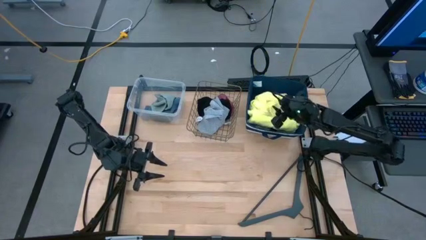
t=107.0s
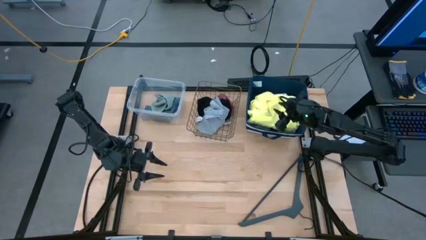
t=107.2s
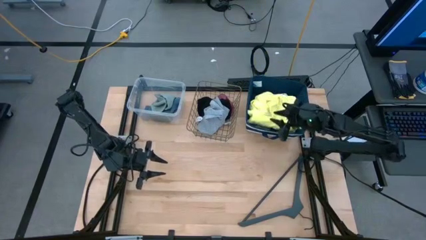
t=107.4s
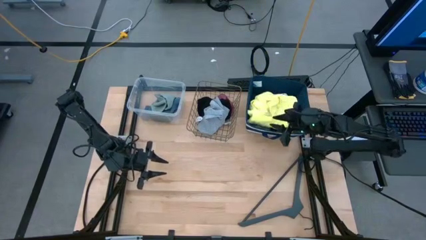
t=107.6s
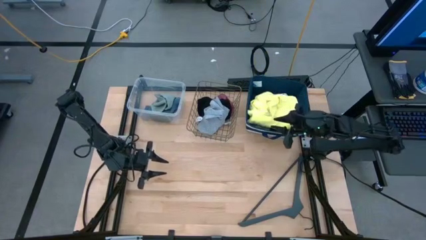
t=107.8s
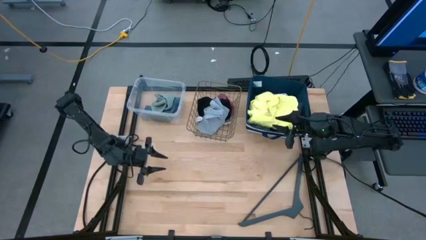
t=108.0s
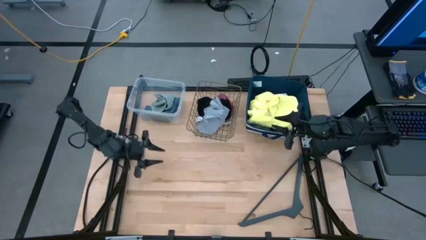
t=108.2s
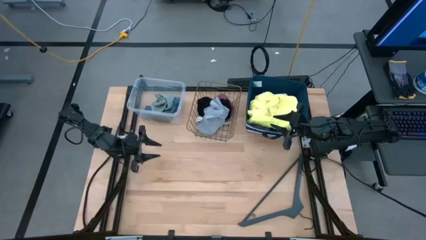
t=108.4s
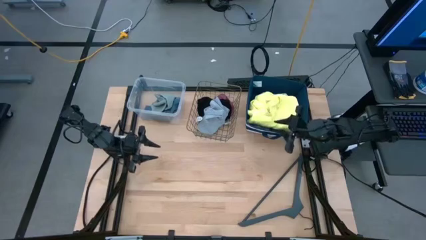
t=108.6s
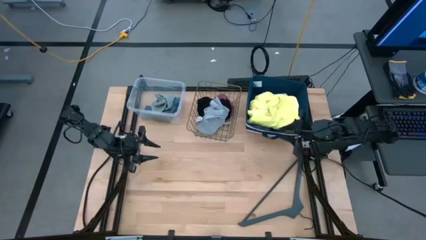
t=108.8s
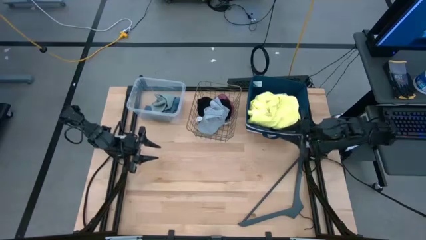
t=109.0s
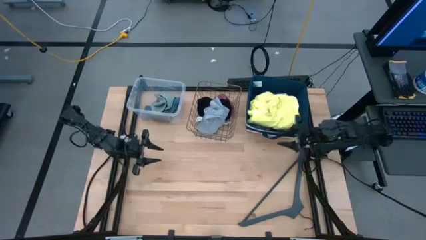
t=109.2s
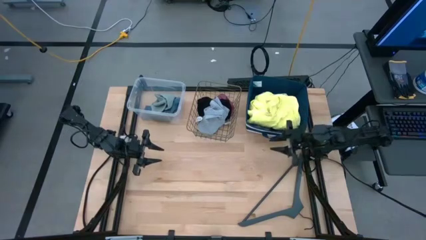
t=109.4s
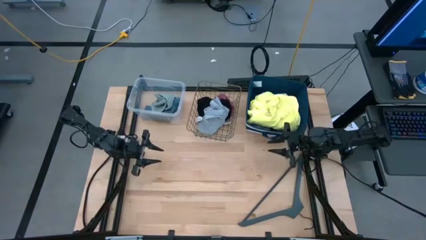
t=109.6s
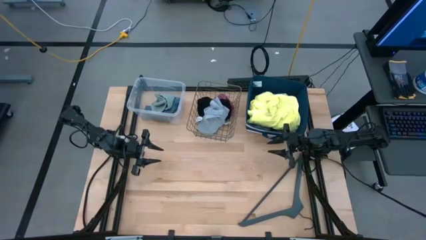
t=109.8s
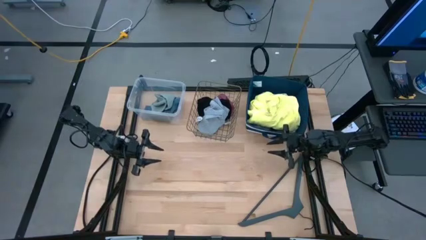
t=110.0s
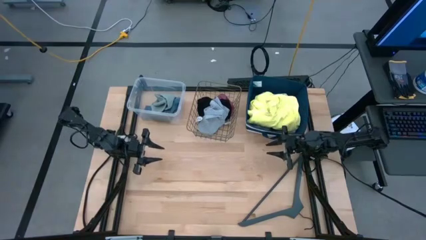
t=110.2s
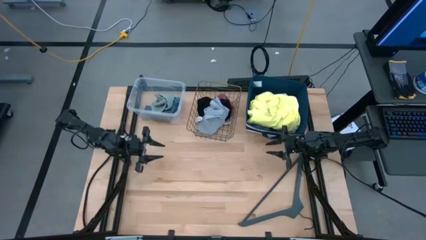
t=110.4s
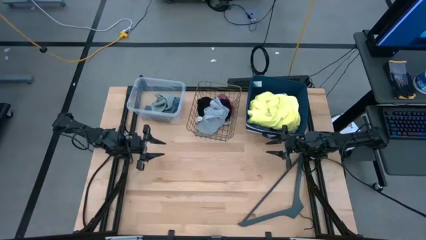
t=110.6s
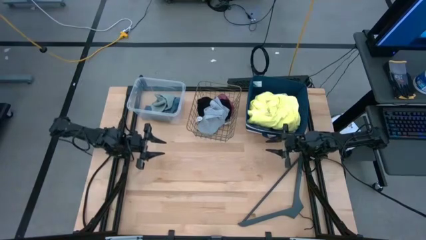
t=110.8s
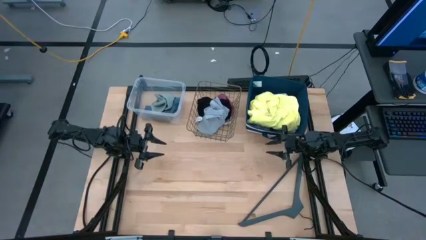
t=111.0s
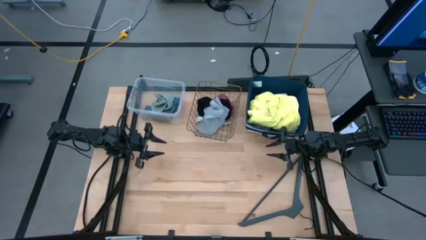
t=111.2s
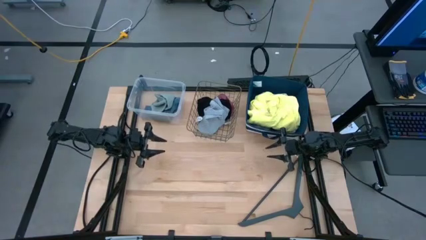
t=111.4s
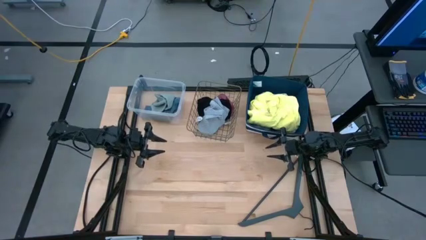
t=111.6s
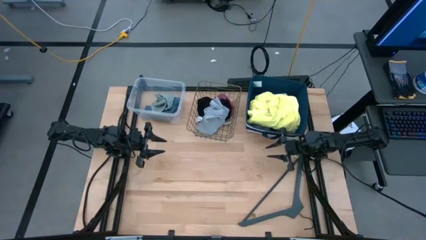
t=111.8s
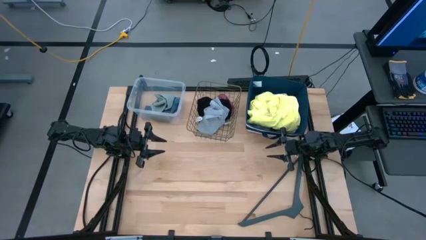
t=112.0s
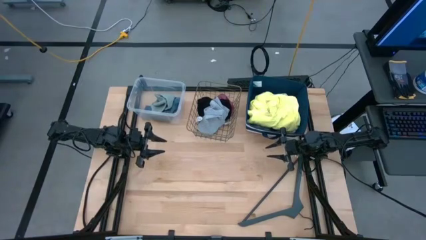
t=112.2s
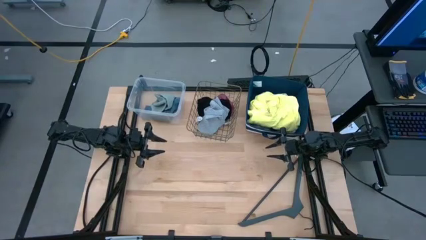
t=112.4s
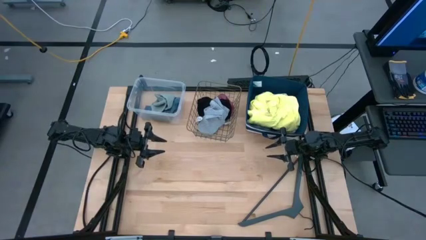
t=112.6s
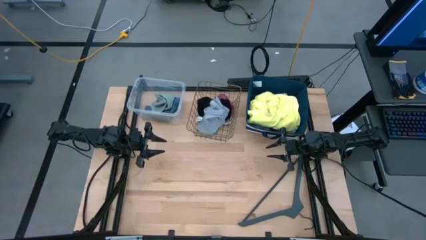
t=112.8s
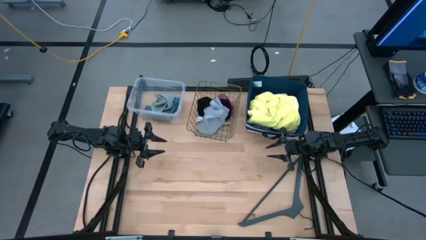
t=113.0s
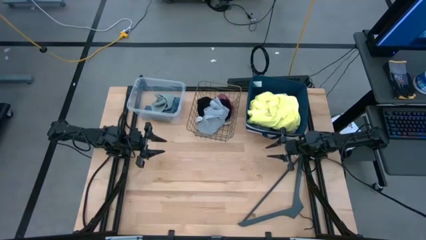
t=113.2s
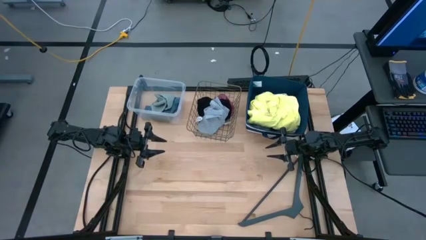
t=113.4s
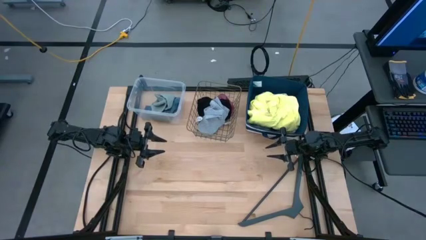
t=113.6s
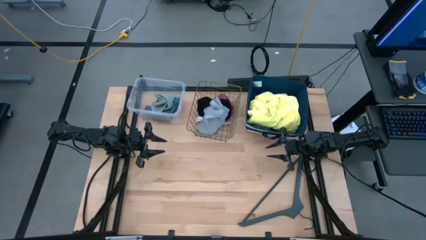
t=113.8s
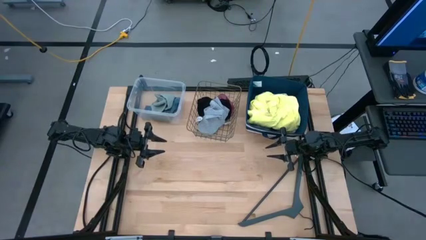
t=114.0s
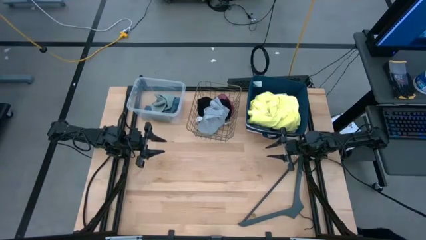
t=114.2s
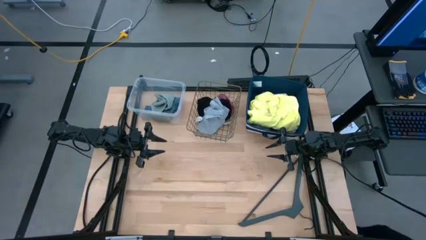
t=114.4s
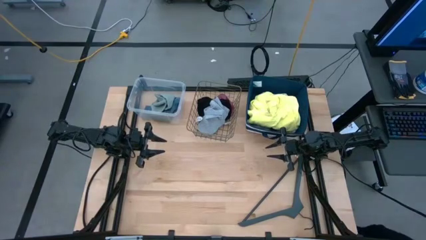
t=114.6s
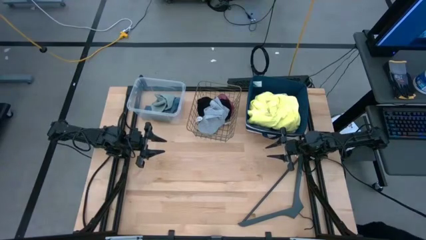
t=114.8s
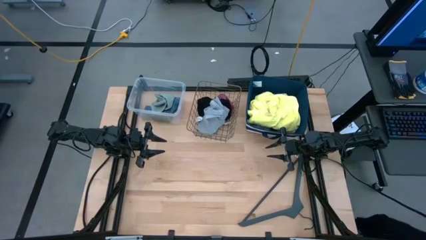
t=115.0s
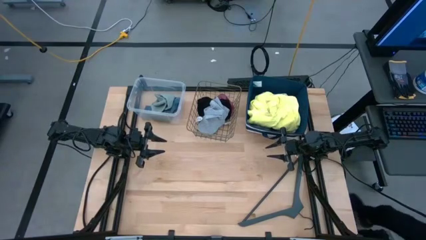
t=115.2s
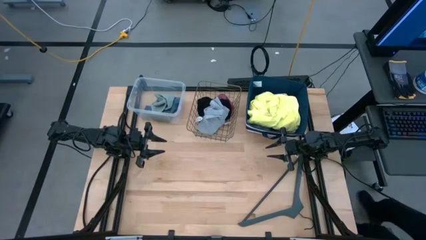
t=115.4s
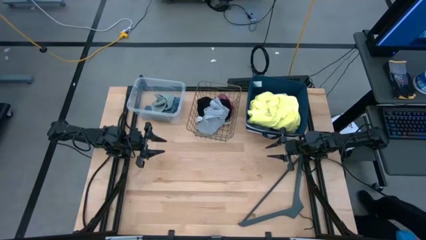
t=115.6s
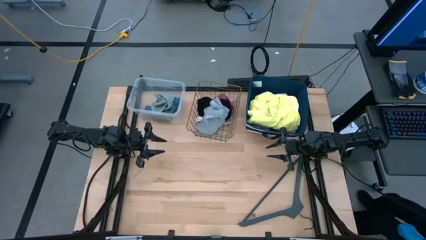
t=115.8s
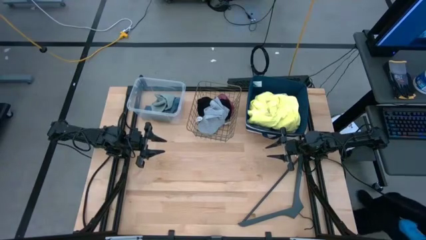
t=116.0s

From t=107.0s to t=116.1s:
Task: Pick & Place Cloths
Return to Home Position

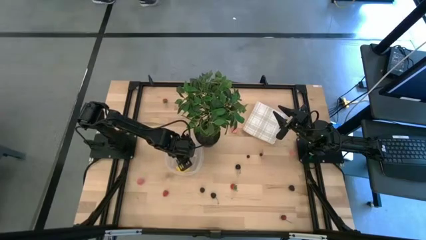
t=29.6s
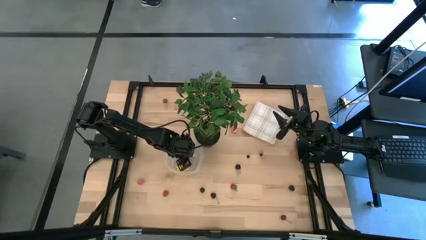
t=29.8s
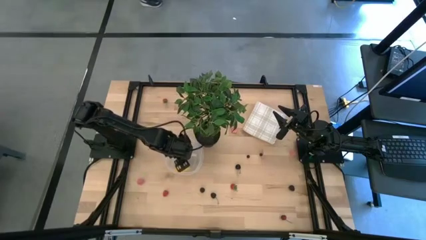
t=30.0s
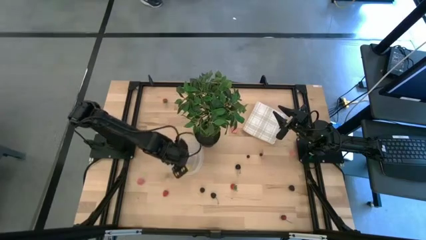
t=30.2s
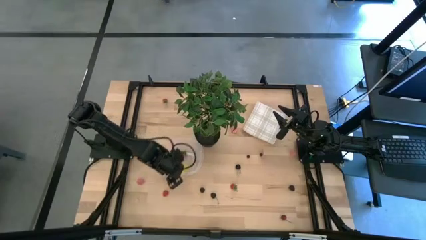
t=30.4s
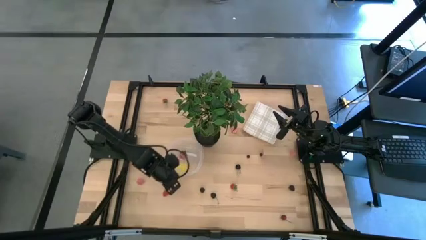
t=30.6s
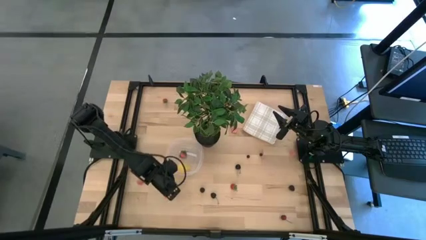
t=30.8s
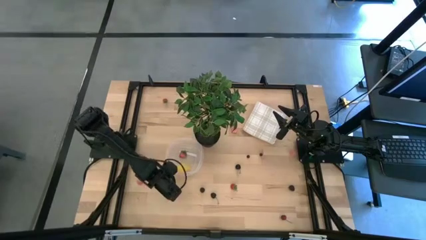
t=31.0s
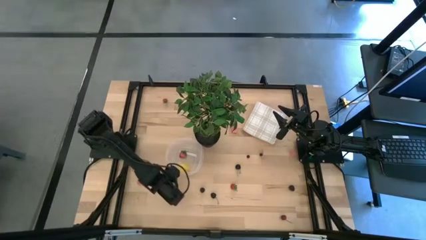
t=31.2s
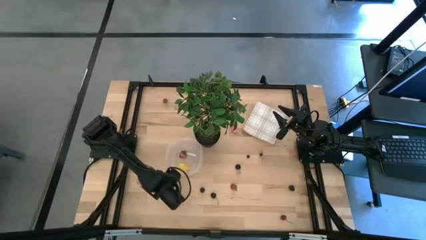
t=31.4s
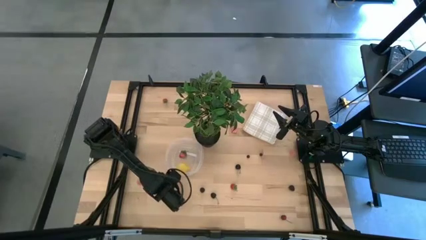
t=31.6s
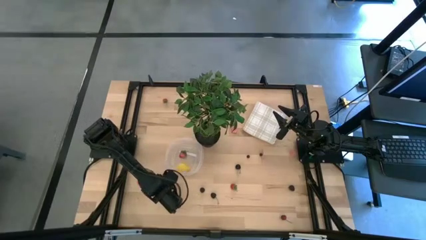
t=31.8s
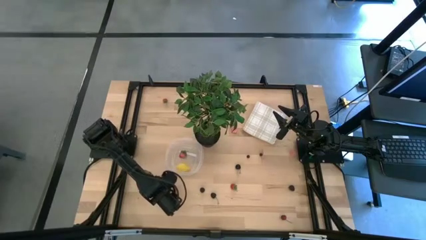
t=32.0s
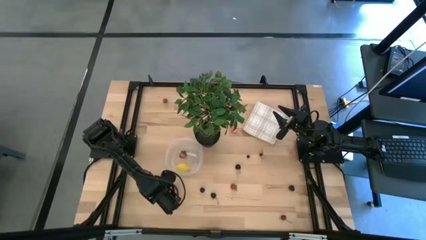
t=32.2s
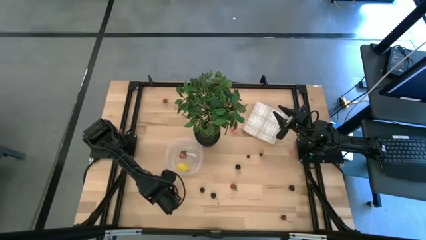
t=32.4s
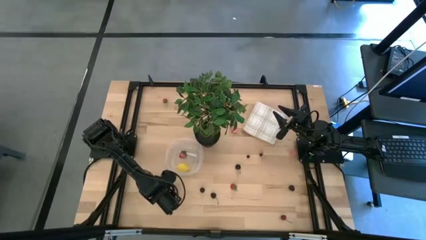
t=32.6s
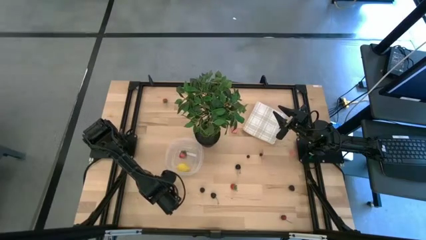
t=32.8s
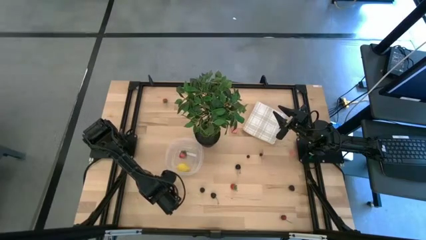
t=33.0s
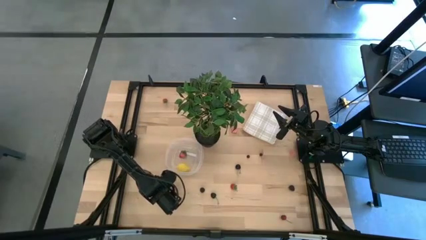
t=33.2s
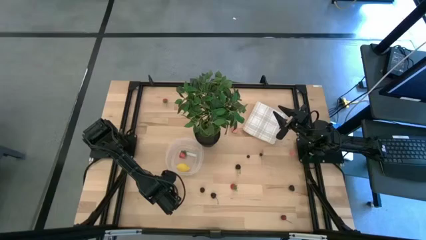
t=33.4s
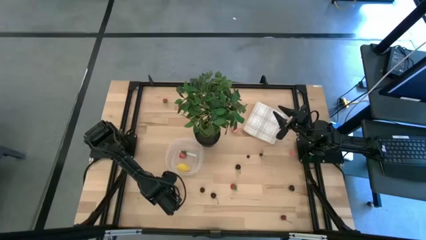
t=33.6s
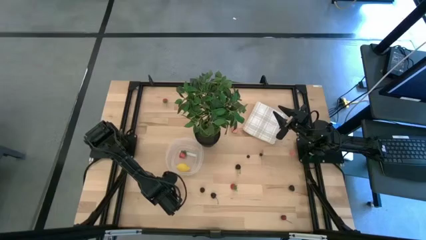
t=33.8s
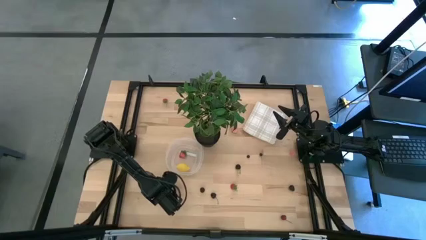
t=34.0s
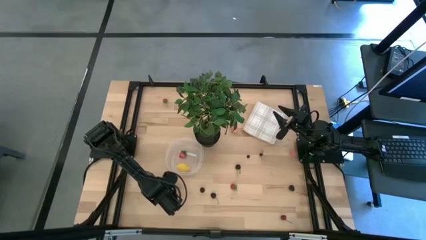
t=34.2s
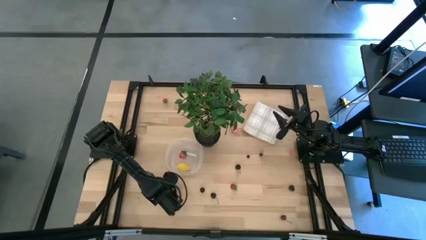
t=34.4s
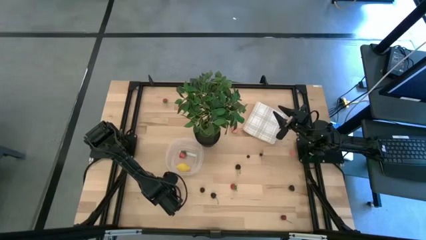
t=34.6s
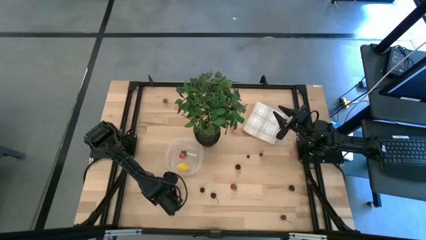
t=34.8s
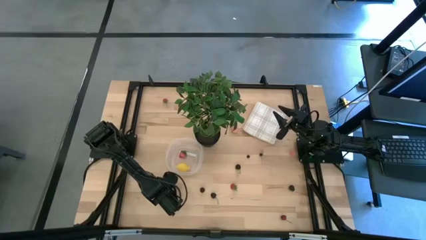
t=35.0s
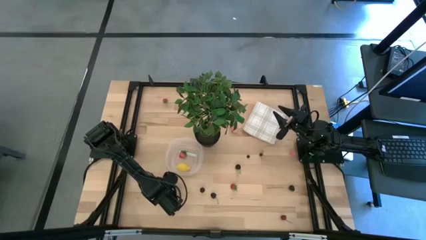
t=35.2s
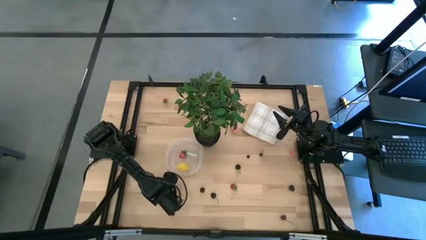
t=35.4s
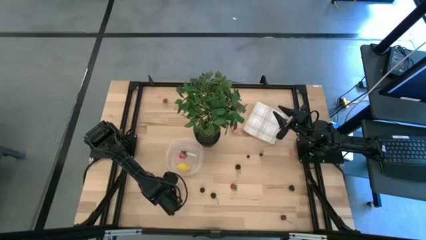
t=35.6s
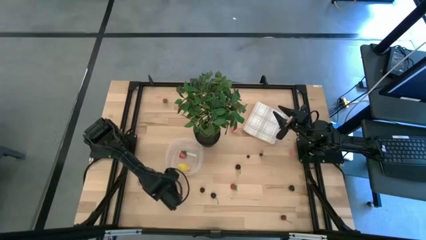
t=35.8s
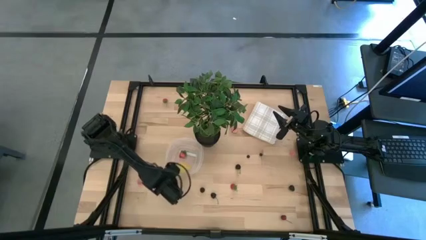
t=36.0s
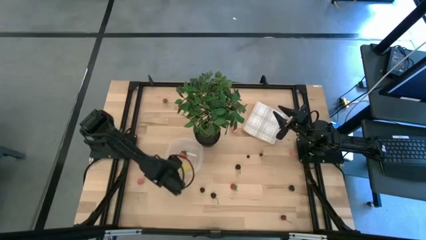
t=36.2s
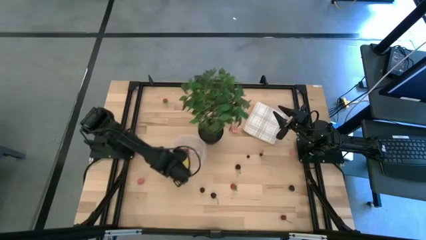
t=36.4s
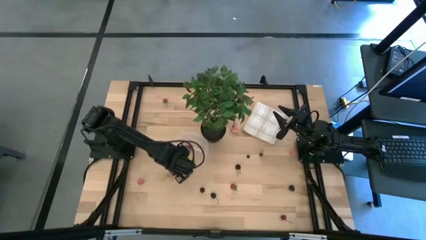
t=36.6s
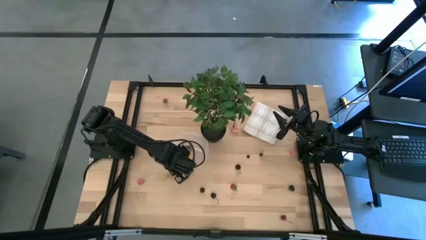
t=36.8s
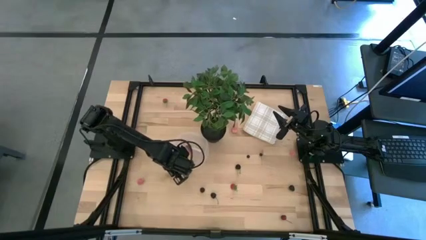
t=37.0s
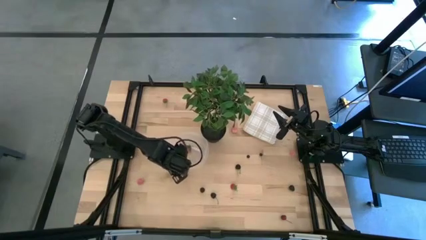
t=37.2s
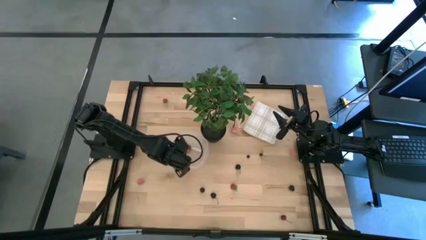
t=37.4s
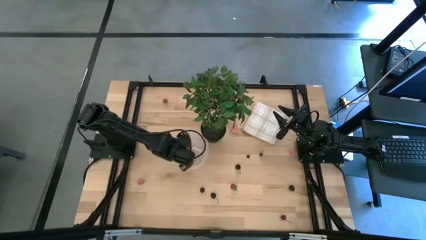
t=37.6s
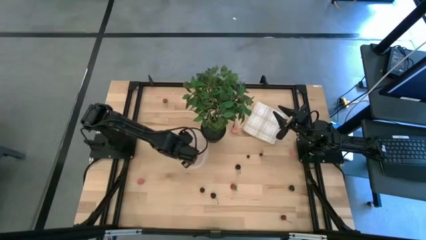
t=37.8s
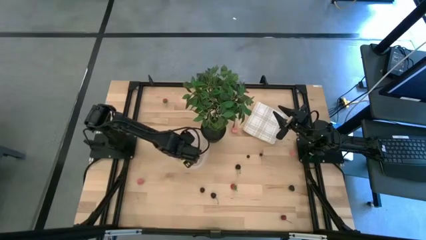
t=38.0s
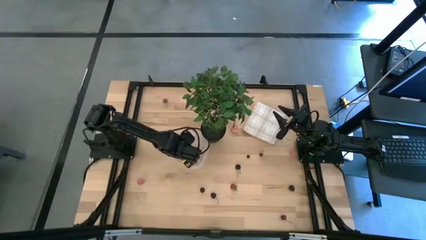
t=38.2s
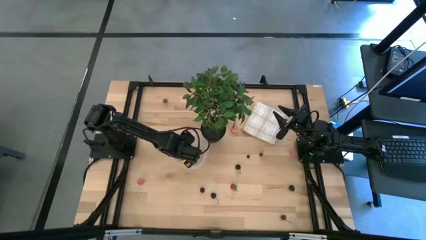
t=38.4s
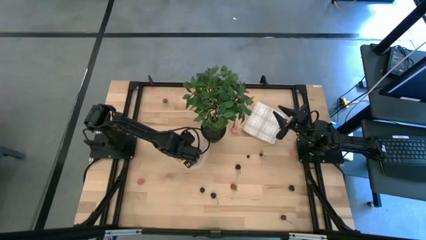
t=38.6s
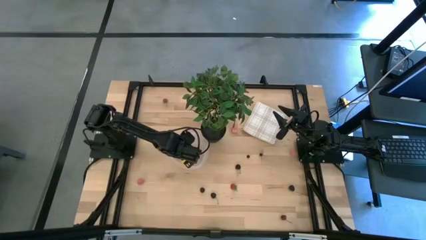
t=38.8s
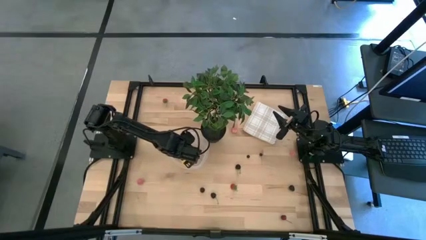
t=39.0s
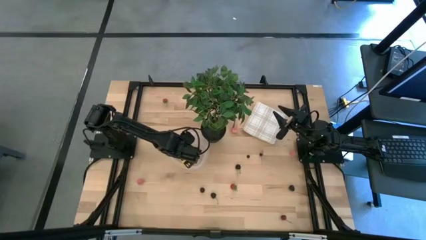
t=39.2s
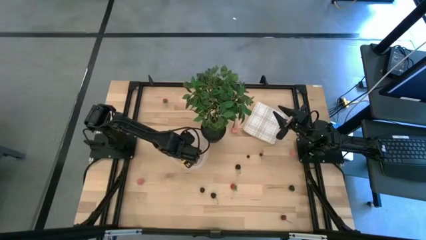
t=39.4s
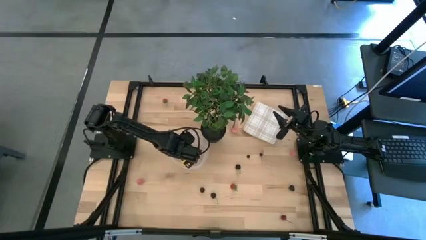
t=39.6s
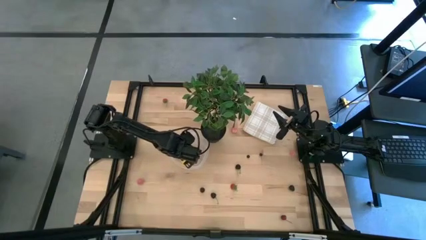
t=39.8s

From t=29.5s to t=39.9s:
Task: Pick and placing Produce into tupperware
Put the red raspberry into the transparent bin
